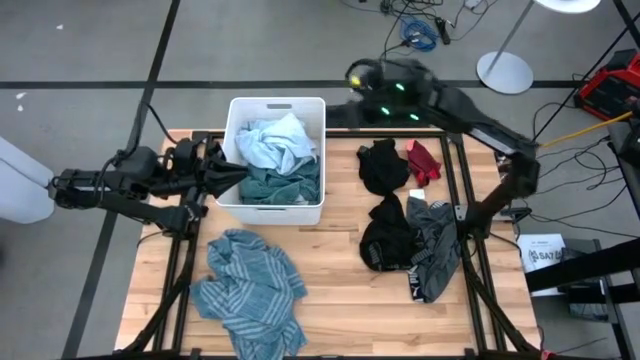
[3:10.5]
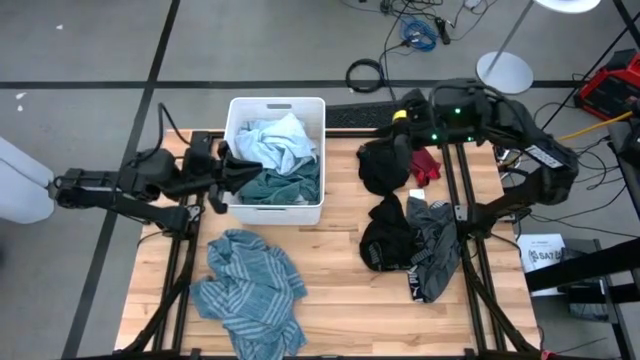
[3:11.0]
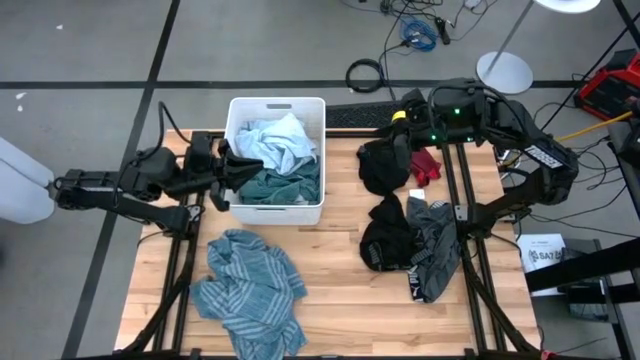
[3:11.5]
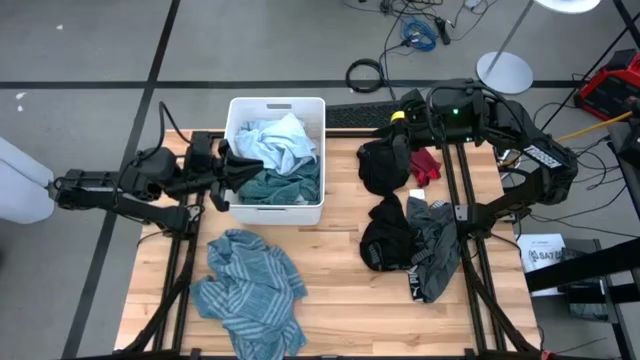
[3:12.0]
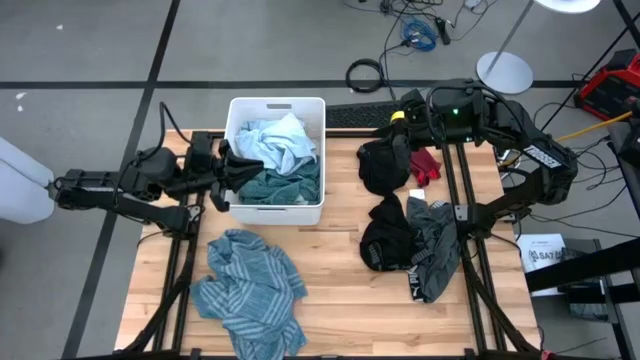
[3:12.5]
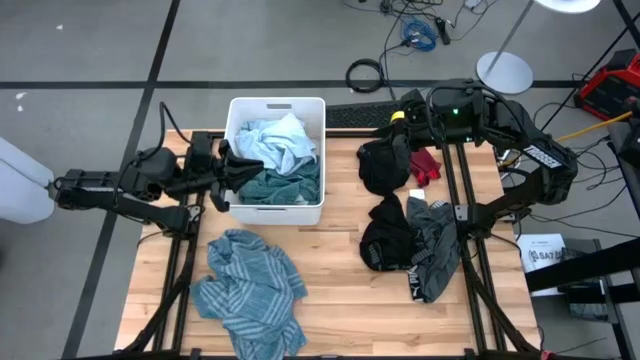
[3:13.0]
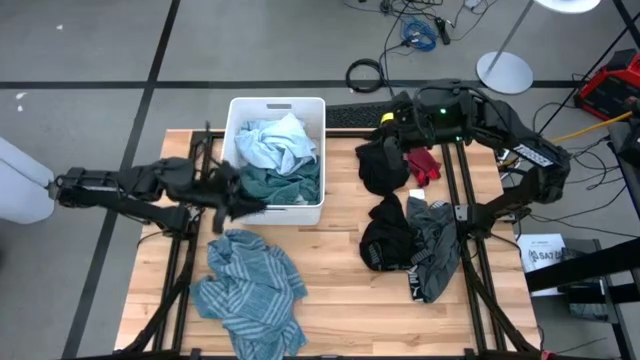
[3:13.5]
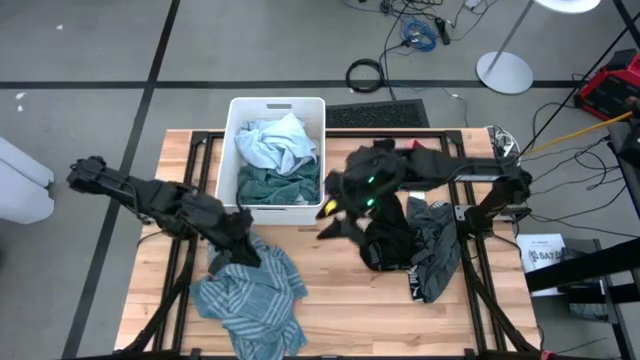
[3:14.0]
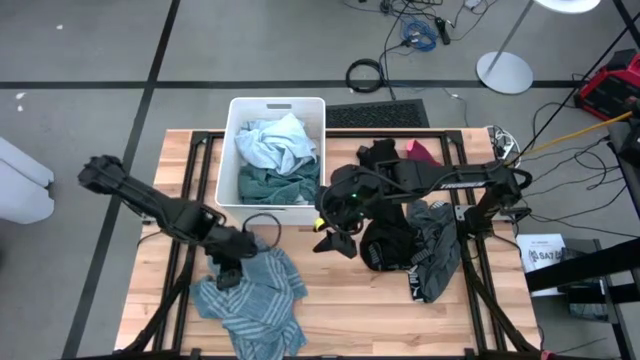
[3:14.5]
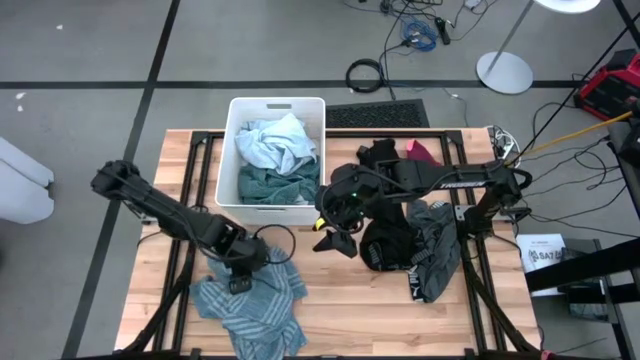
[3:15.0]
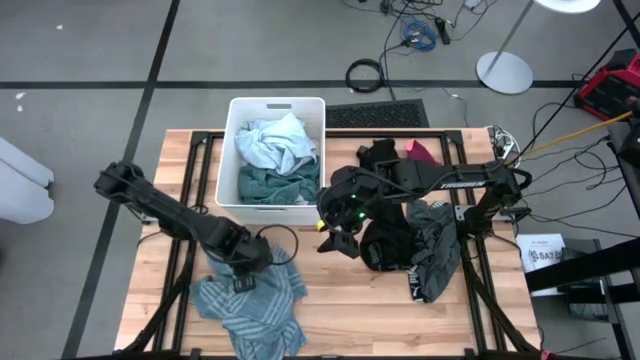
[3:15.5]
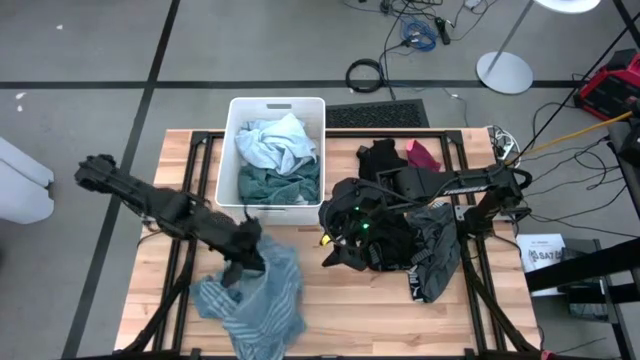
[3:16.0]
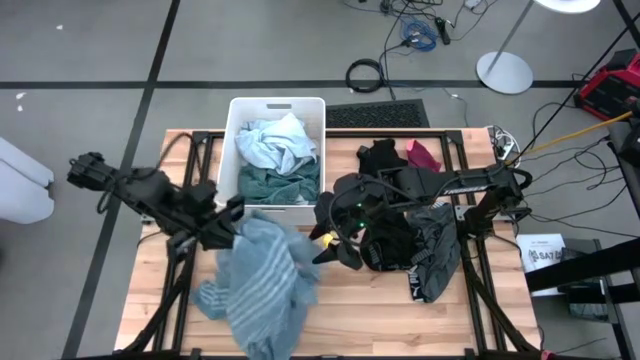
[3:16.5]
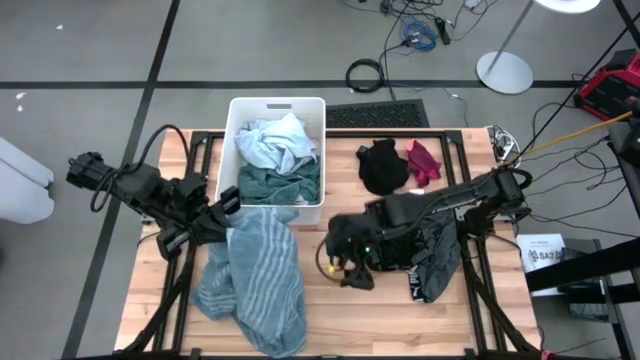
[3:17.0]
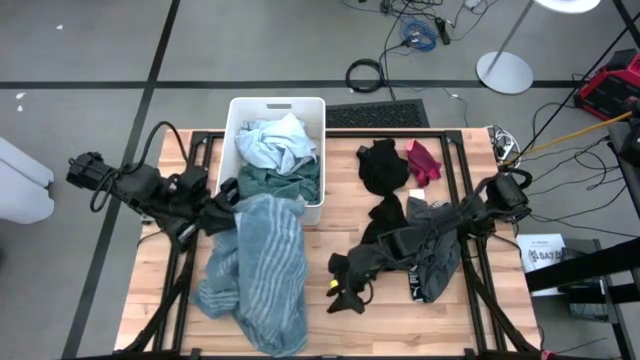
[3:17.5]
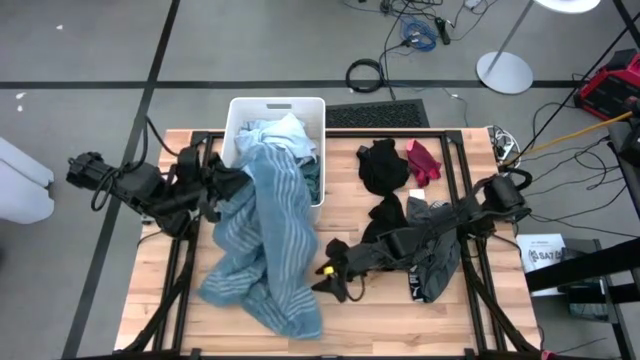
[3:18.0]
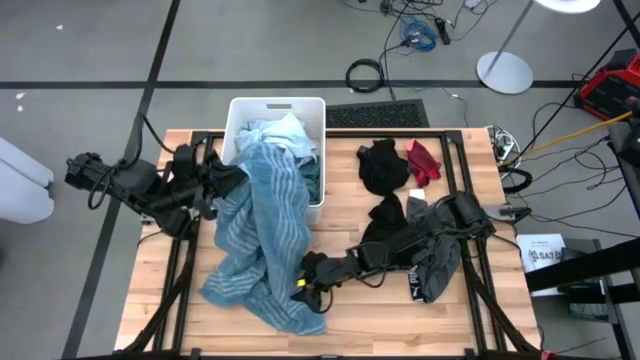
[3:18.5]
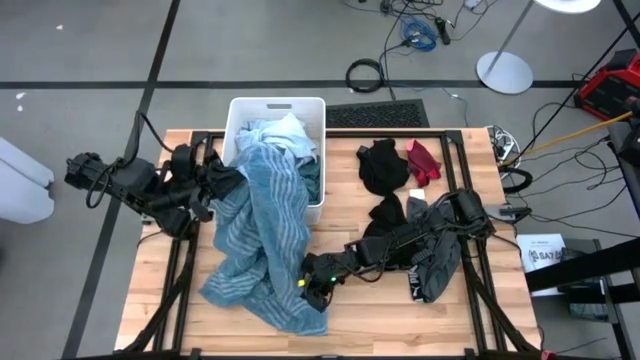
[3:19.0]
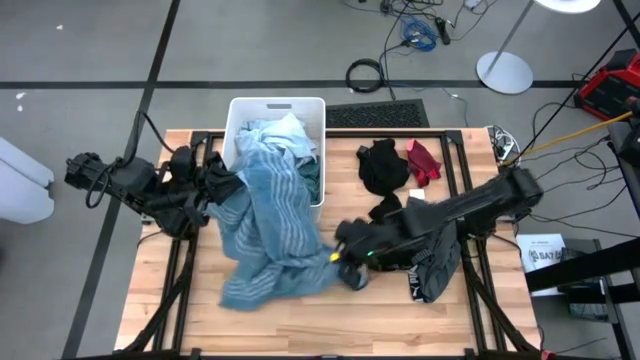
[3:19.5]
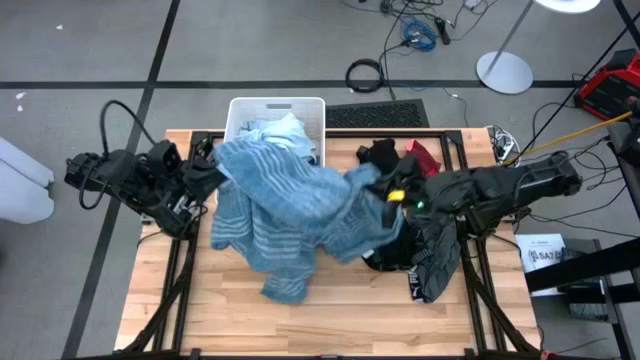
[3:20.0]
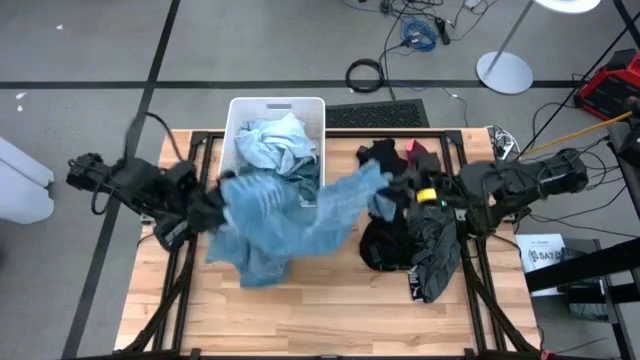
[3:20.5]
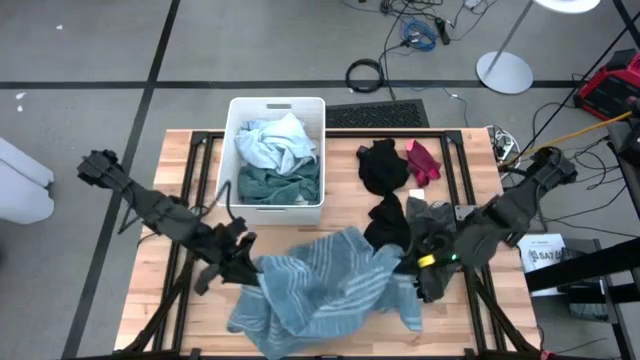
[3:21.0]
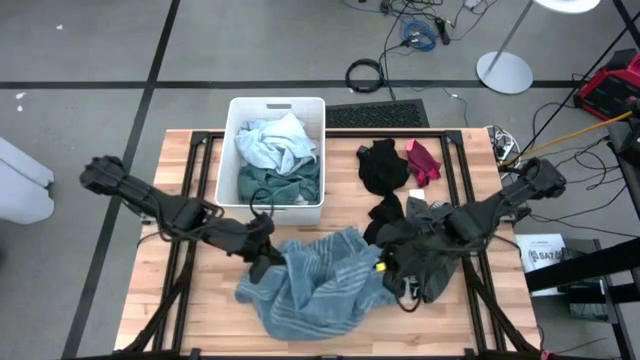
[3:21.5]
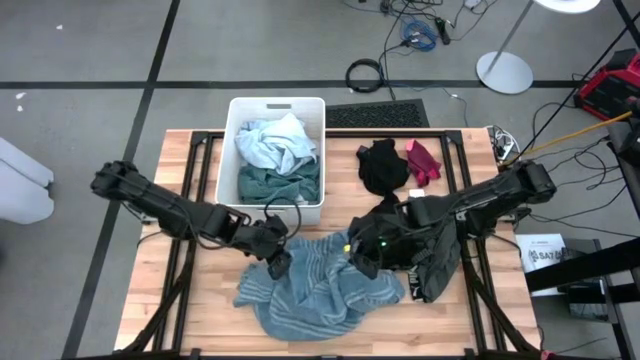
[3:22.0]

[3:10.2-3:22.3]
Task: Sort clothes
Put the blue shirt into the white laundry organizer

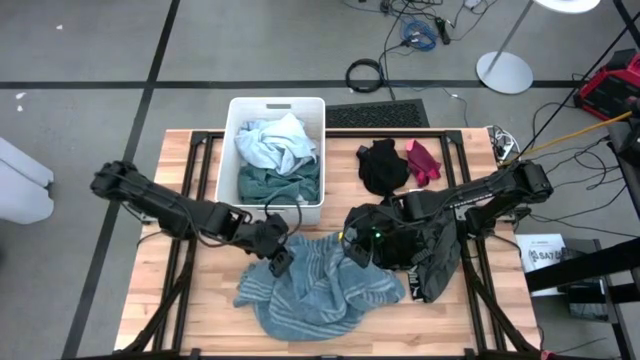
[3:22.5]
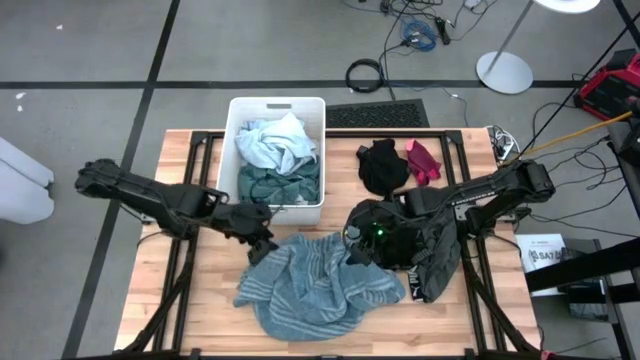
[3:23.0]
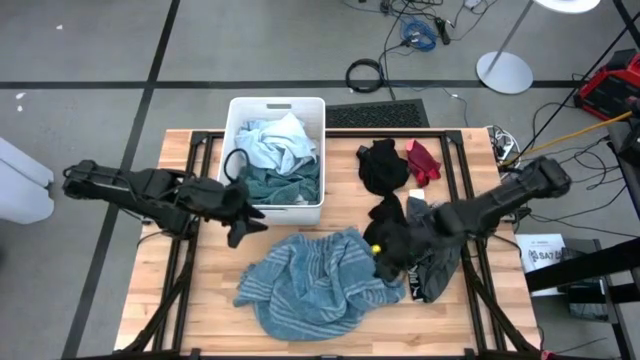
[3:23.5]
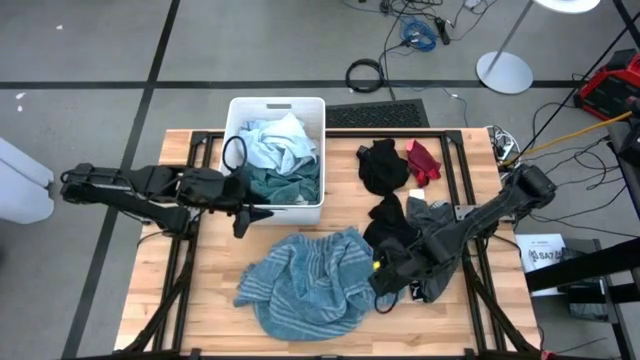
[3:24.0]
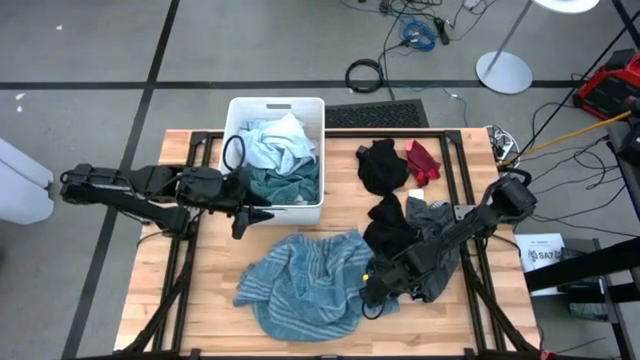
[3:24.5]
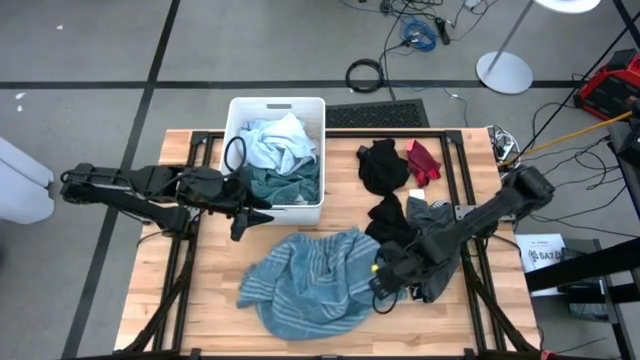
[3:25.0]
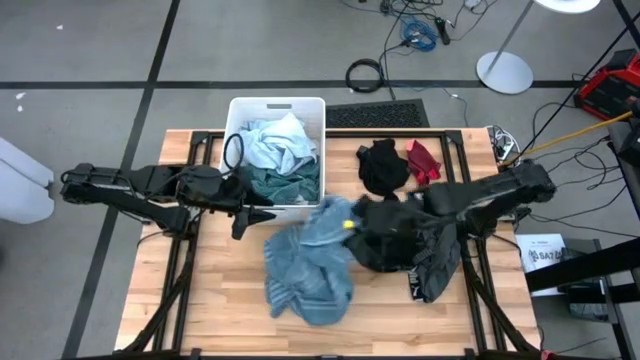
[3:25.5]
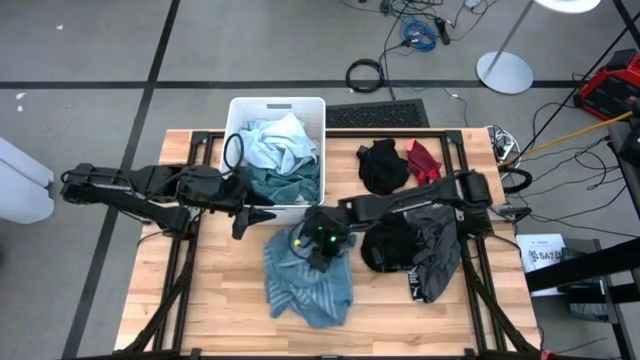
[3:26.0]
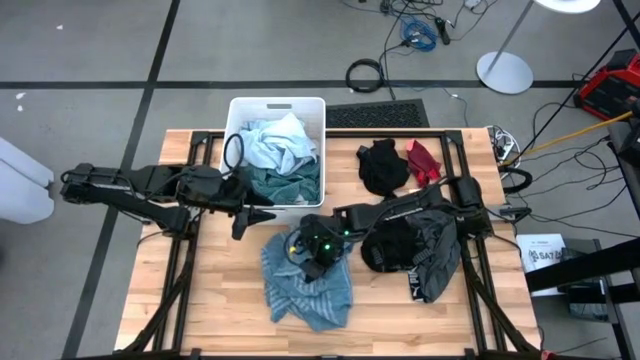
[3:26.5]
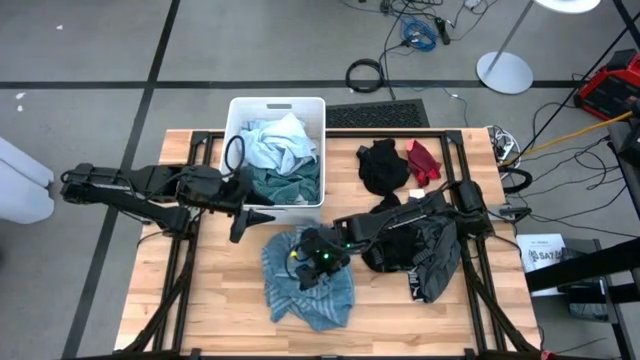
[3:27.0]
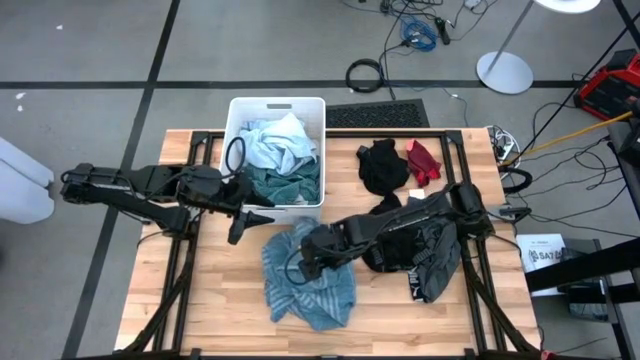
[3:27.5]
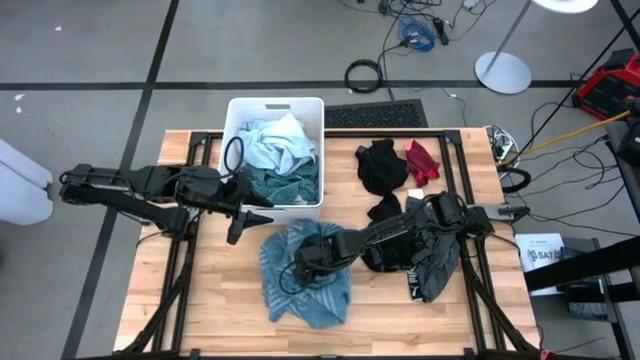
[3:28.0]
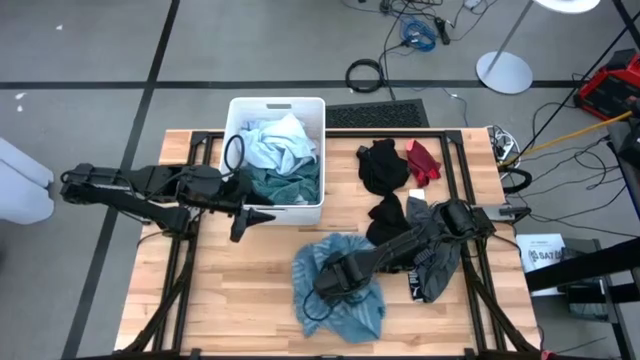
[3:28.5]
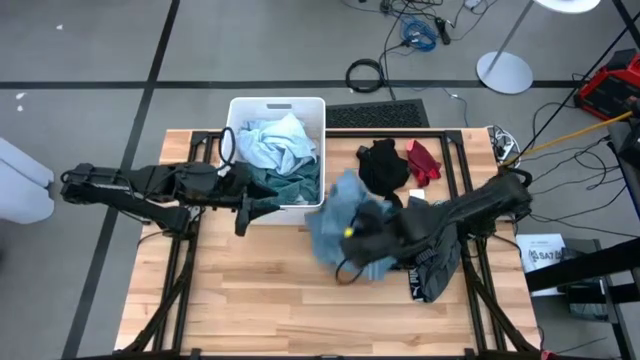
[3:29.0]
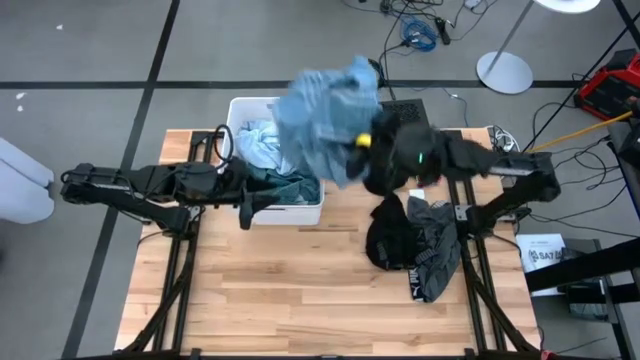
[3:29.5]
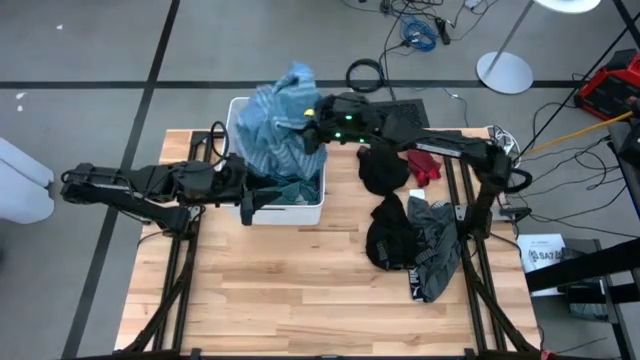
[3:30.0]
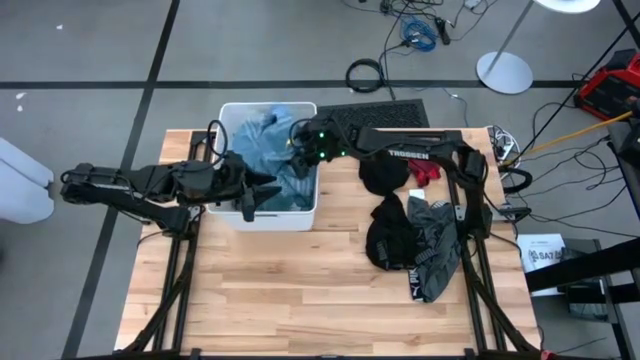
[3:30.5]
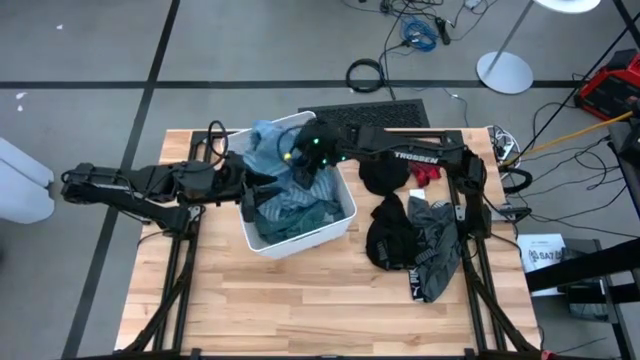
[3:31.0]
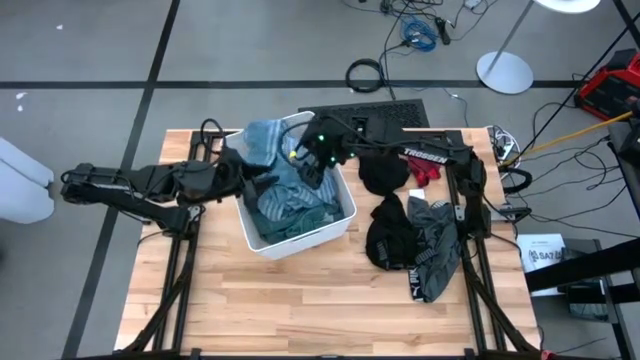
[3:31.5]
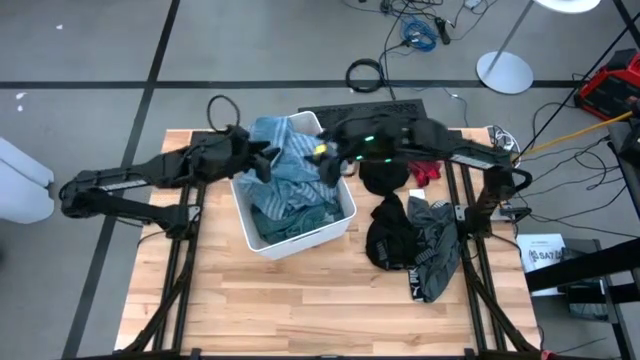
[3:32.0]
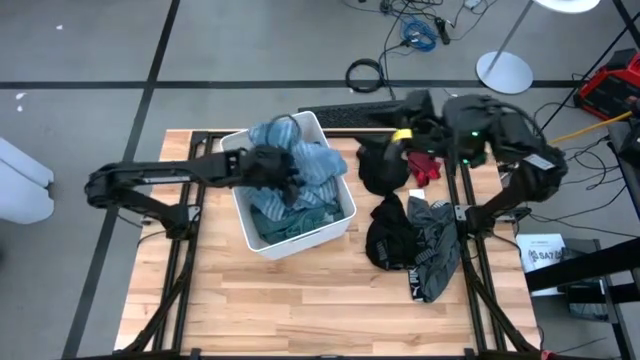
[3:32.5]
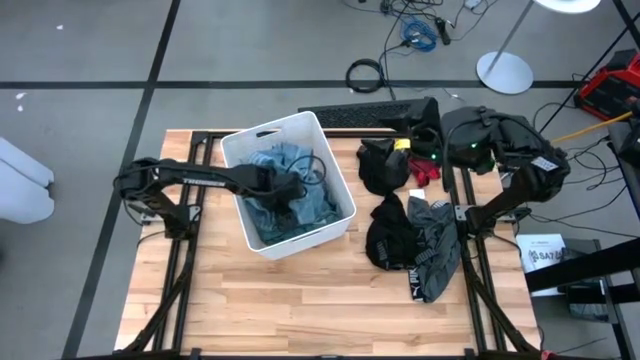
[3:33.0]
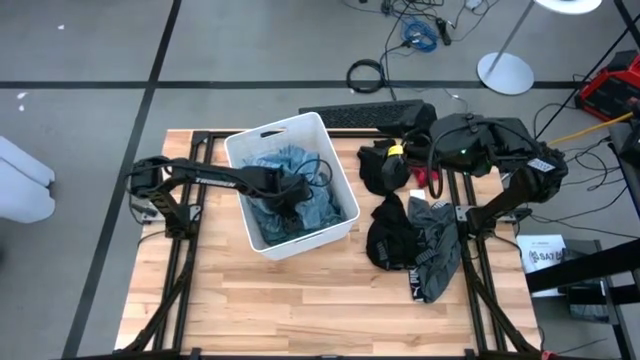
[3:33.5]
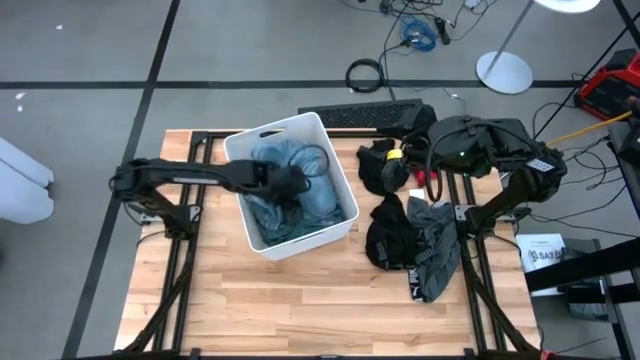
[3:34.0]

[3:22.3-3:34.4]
Put the blue shirt into the white laundry organizer
